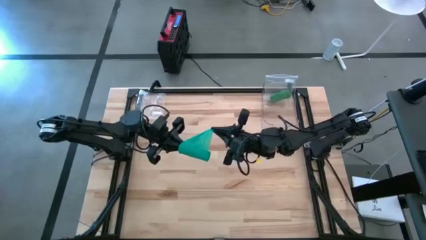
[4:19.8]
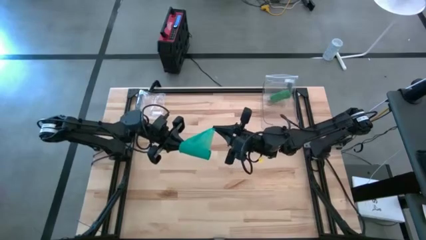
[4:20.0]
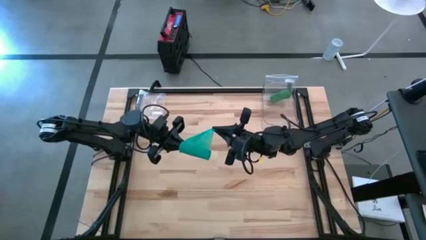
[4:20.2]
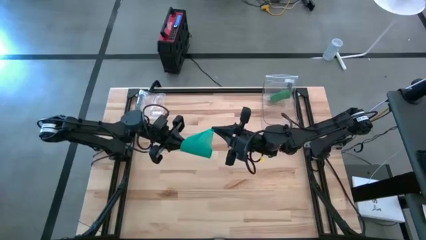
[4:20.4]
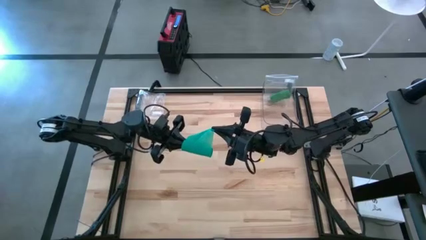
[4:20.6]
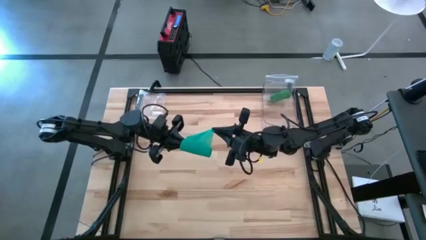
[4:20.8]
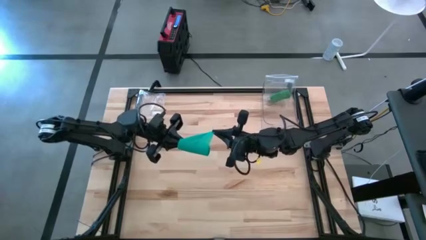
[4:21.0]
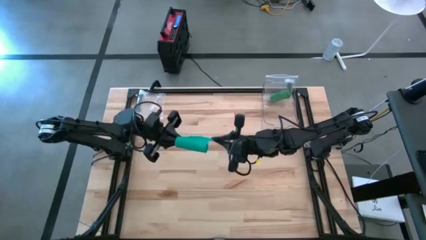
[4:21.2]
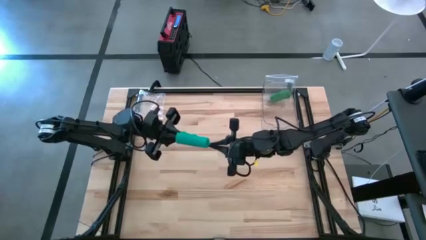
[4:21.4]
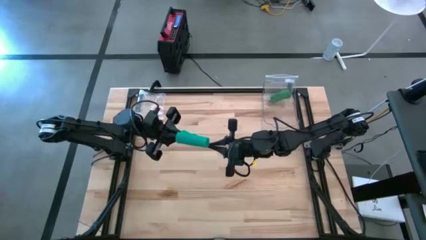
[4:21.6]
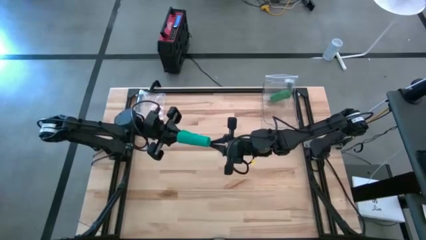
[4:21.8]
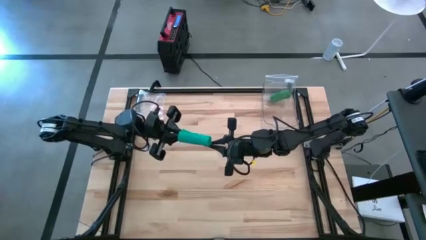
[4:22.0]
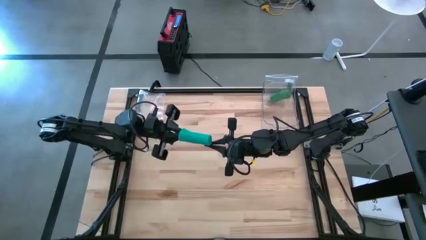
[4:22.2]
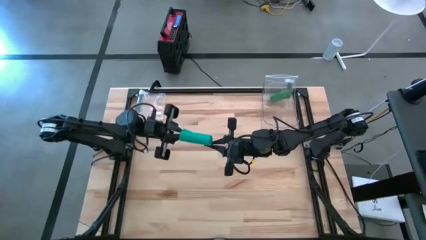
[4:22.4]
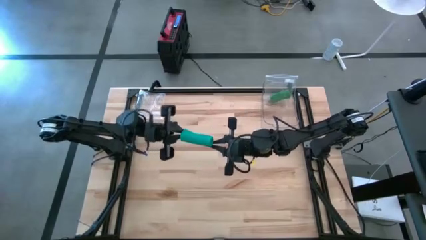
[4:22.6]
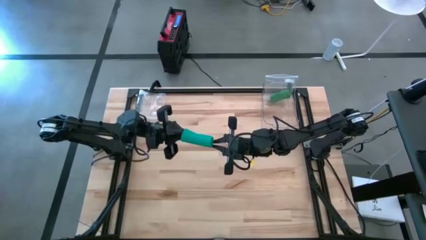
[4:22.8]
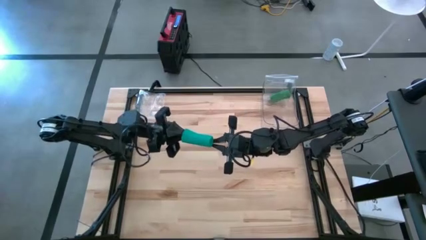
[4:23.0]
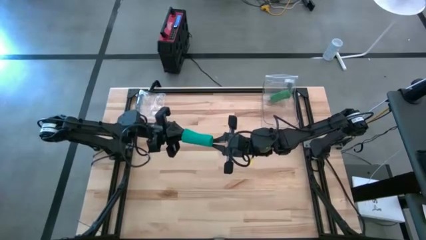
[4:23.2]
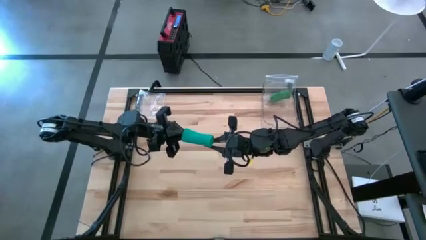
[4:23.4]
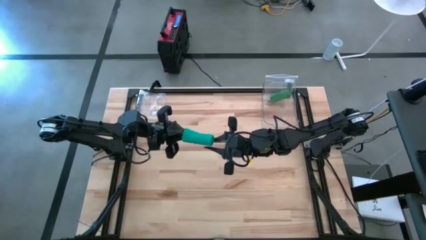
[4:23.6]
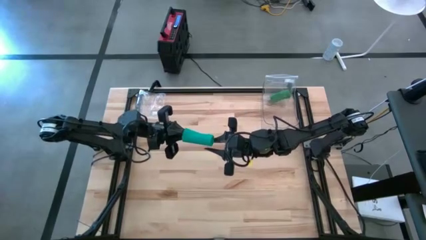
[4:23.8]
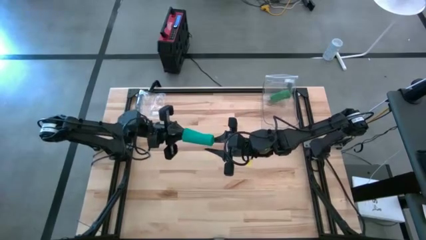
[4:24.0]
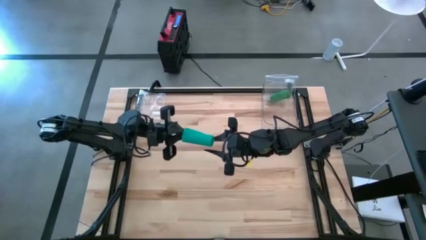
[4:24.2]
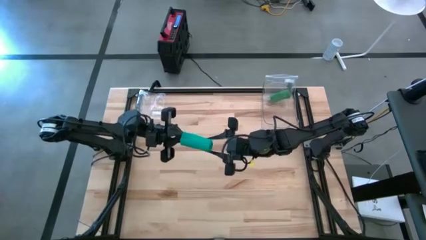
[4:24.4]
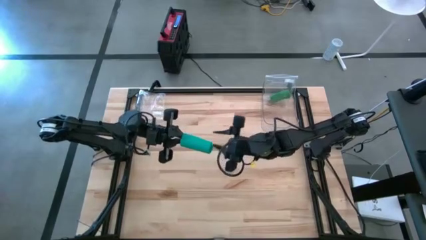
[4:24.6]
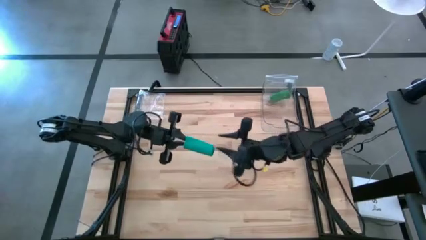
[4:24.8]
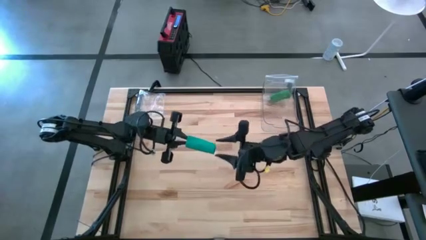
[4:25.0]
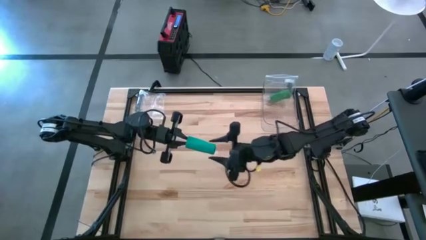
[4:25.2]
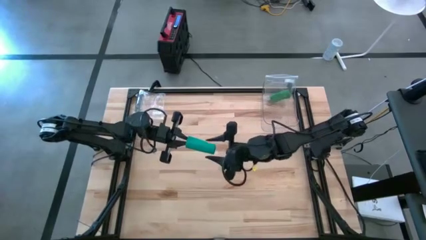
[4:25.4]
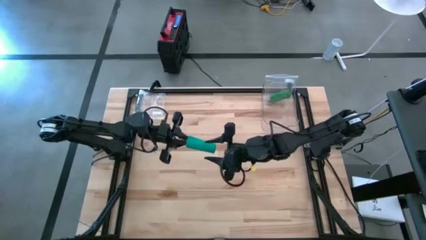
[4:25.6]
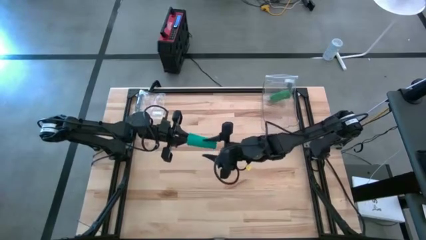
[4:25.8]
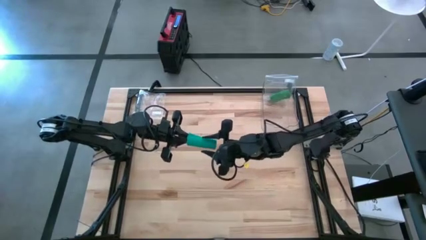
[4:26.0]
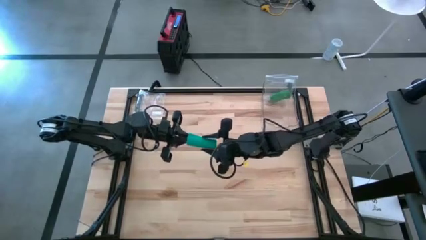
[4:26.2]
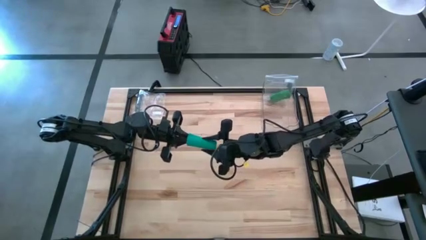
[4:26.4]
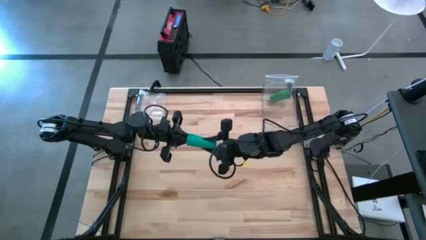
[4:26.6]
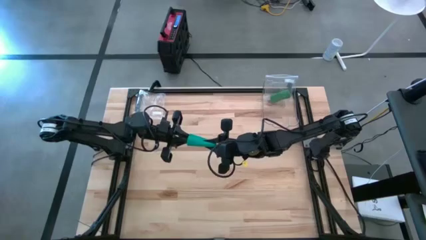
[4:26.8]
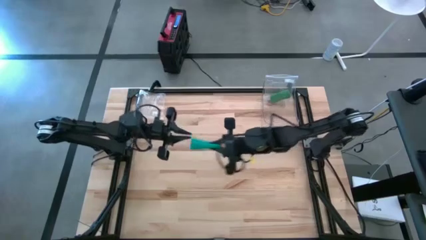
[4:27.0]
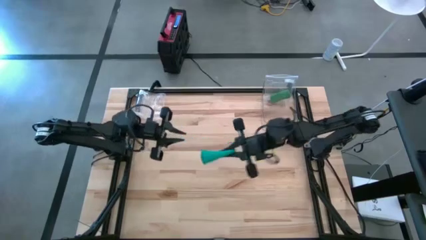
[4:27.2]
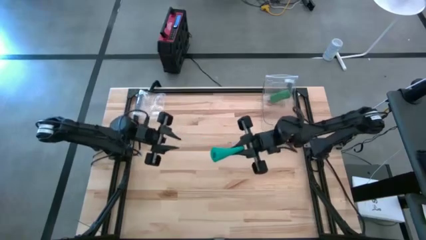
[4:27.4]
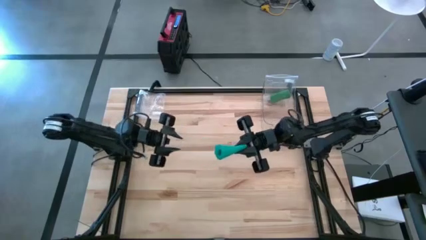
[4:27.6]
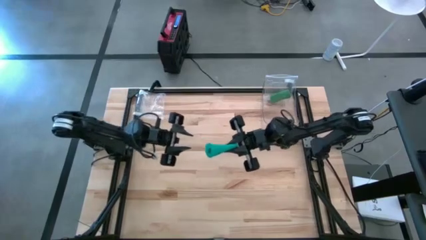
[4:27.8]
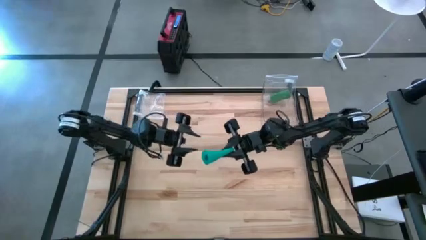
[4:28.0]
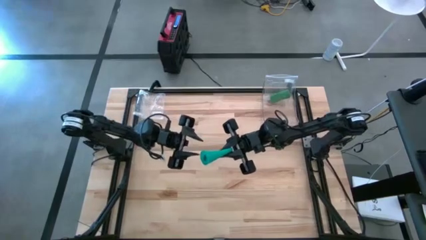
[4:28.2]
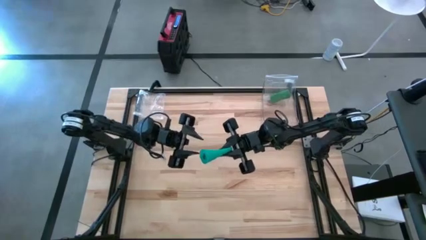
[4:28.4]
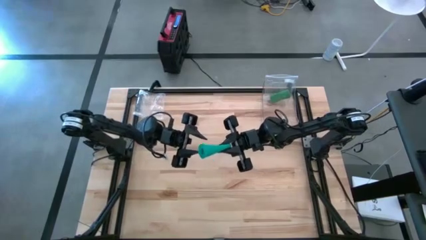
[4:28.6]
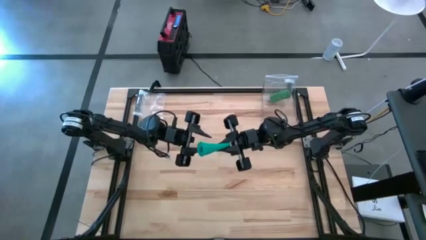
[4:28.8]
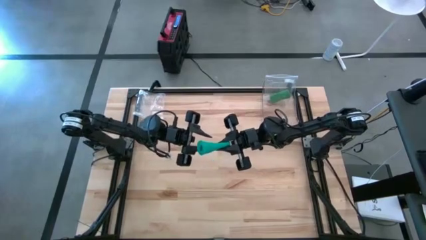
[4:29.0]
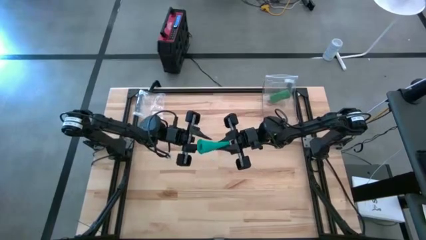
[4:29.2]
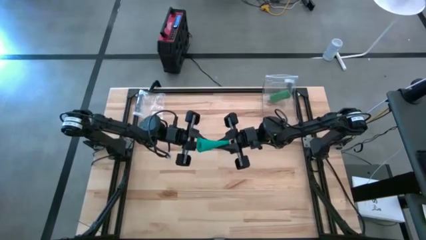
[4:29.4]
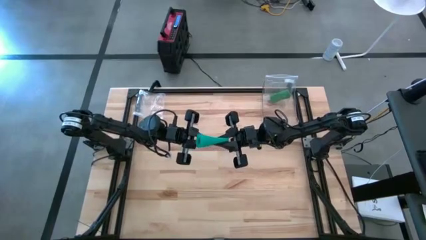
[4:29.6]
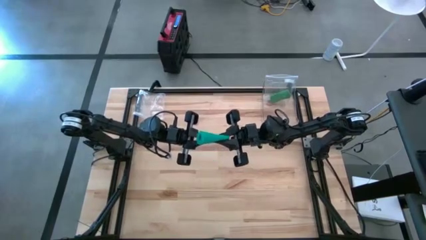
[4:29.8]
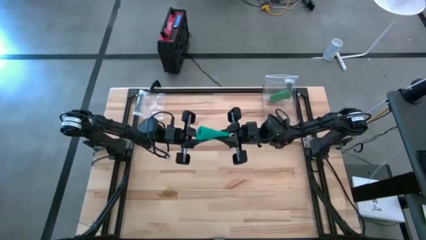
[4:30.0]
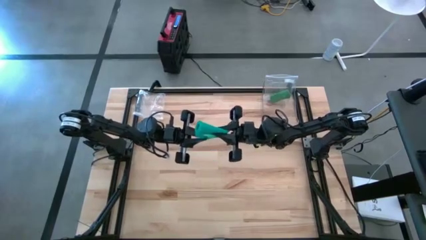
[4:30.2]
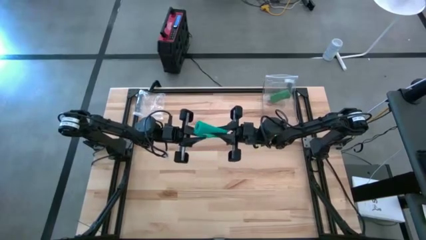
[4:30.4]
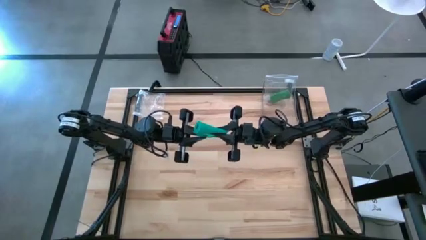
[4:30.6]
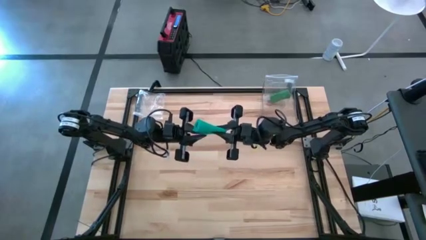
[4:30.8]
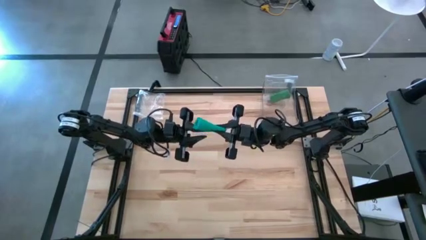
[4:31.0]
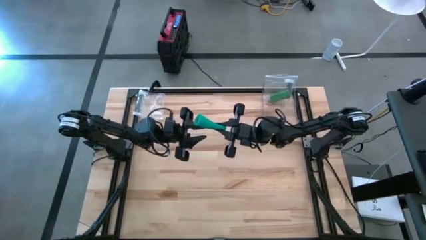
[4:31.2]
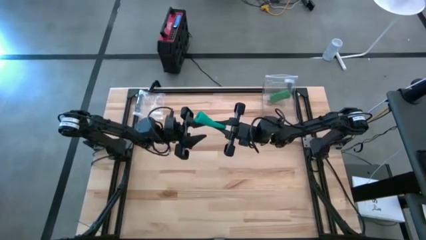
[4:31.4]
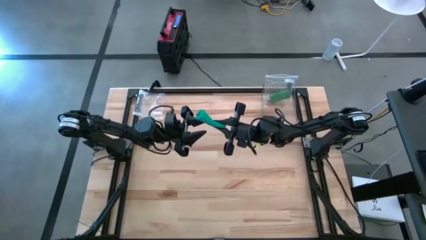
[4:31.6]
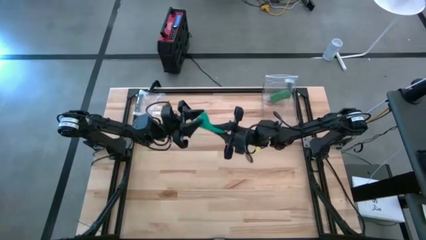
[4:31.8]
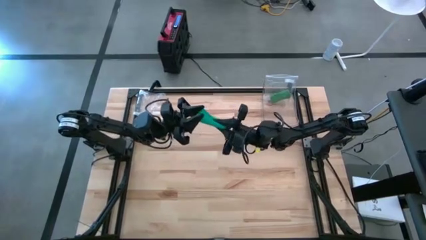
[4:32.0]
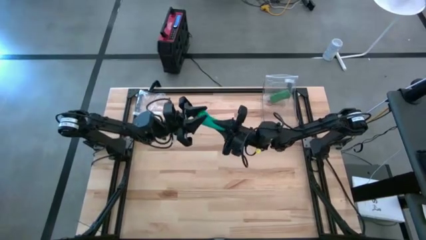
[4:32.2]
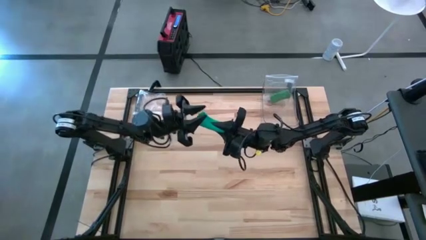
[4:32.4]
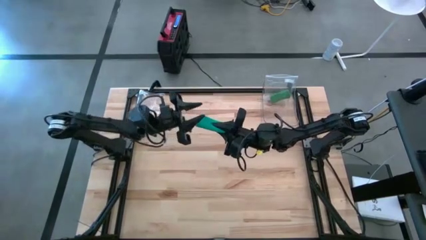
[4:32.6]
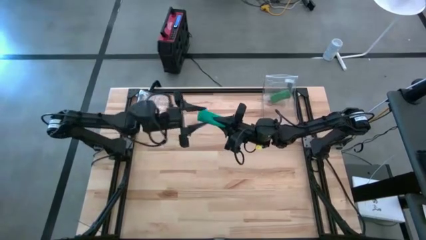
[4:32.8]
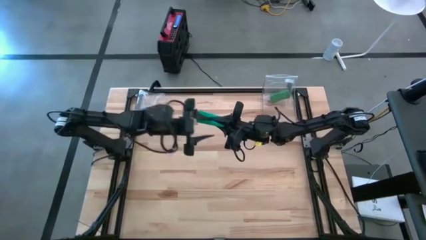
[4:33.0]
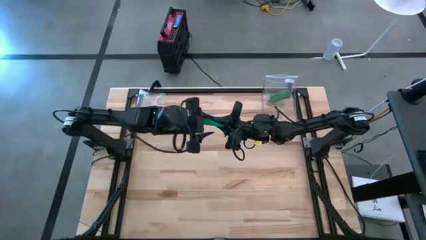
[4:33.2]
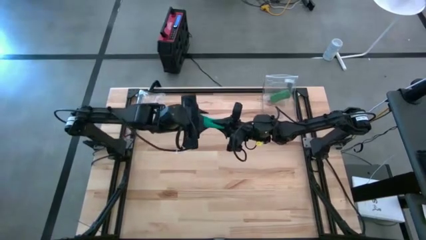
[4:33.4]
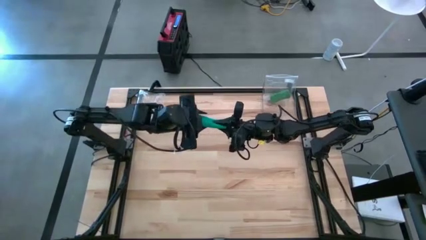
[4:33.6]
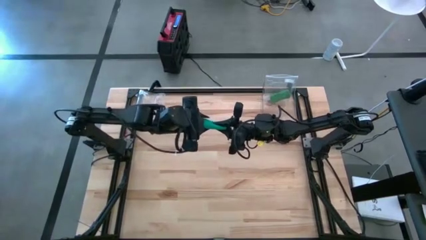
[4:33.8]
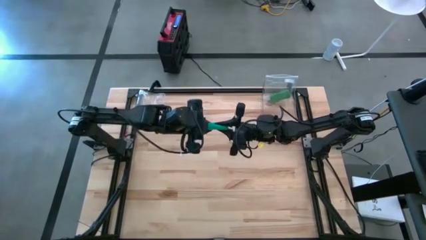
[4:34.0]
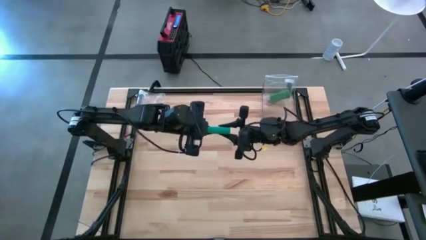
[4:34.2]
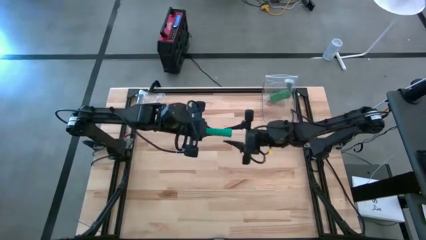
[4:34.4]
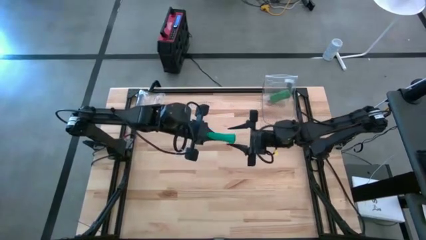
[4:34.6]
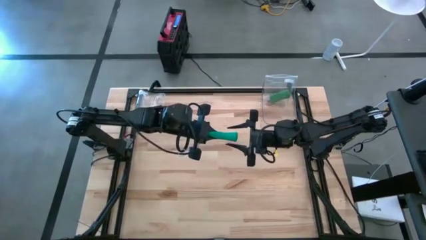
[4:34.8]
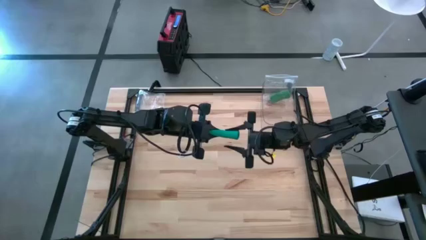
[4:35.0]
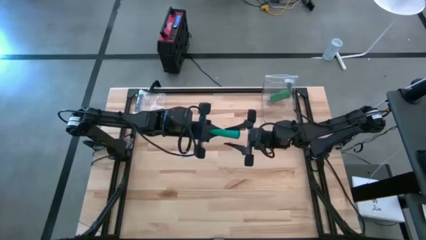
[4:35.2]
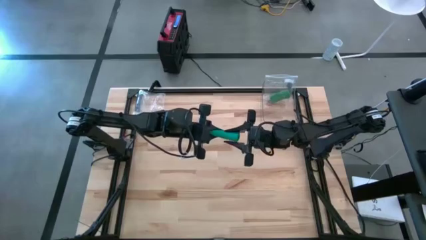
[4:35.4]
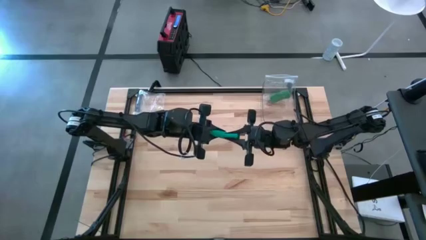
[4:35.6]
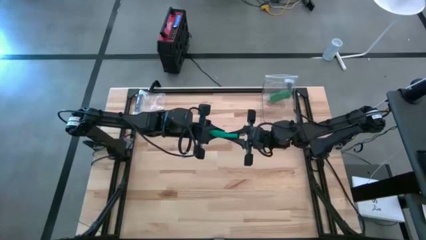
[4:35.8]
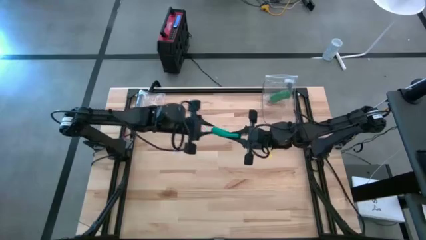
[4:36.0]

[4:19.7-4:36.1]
Task: Roll bandage
Roll the dark green bandage
